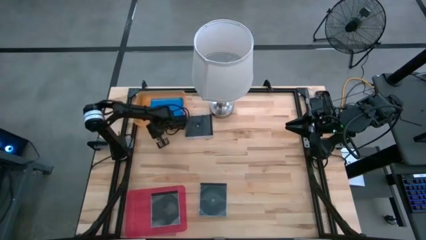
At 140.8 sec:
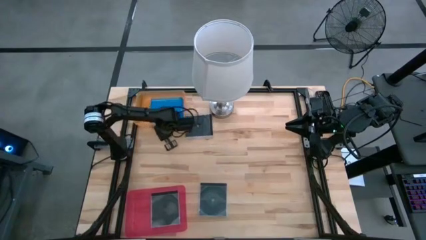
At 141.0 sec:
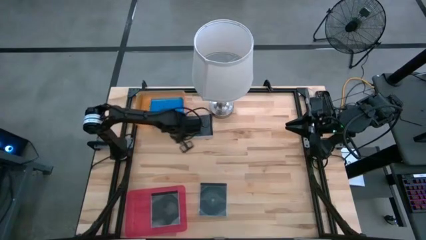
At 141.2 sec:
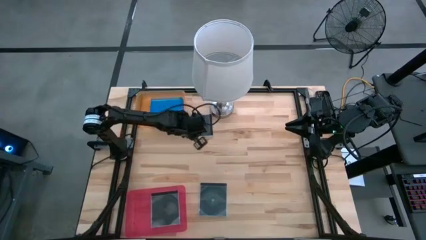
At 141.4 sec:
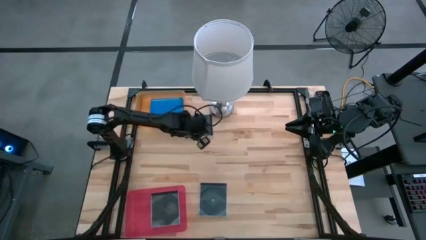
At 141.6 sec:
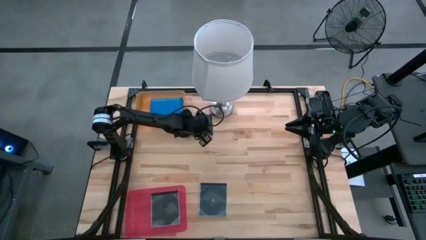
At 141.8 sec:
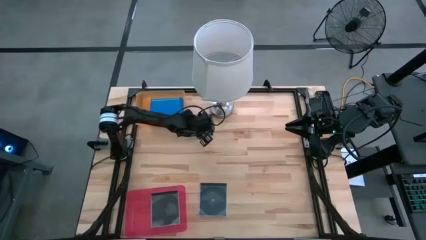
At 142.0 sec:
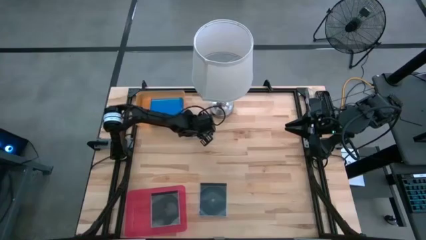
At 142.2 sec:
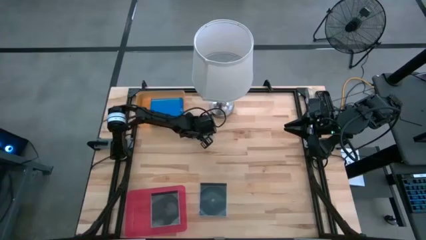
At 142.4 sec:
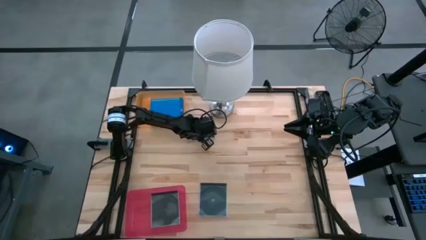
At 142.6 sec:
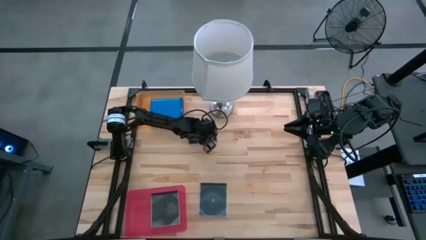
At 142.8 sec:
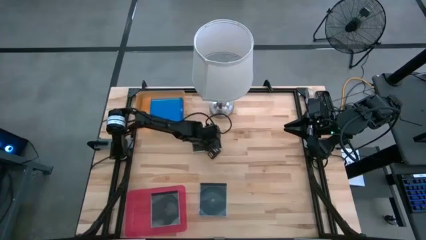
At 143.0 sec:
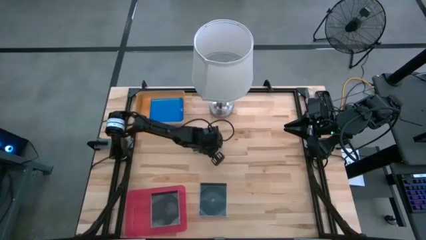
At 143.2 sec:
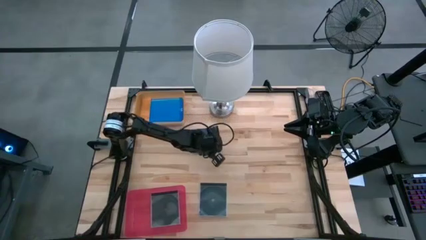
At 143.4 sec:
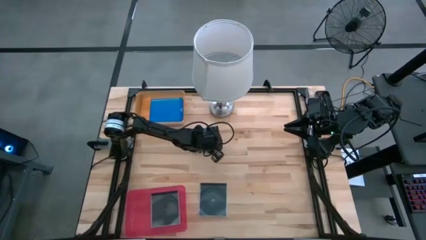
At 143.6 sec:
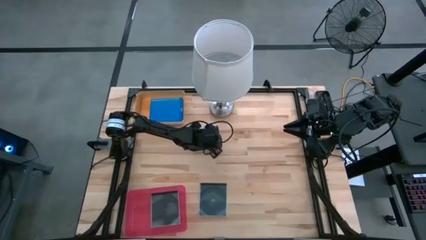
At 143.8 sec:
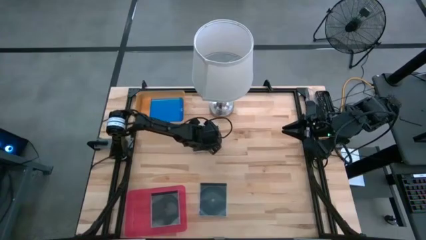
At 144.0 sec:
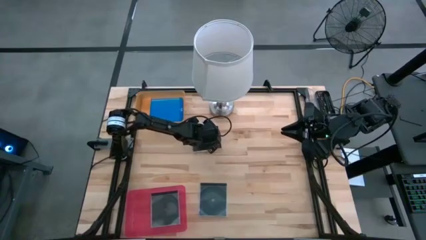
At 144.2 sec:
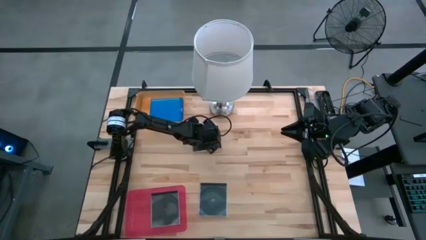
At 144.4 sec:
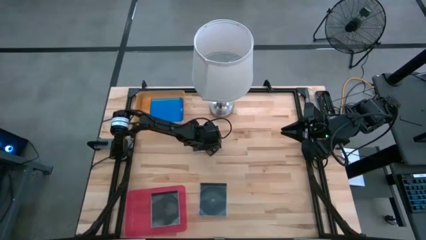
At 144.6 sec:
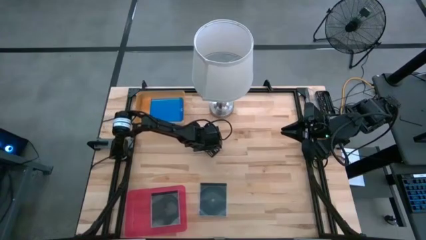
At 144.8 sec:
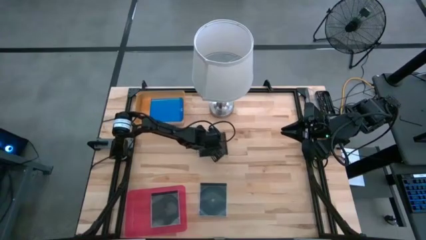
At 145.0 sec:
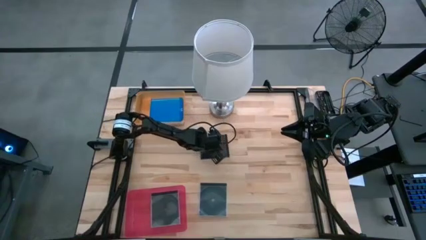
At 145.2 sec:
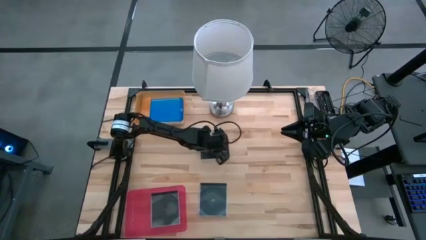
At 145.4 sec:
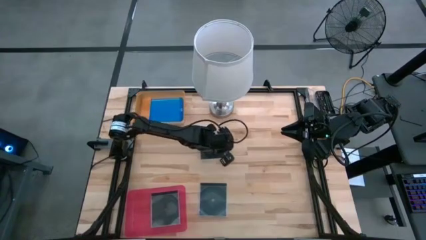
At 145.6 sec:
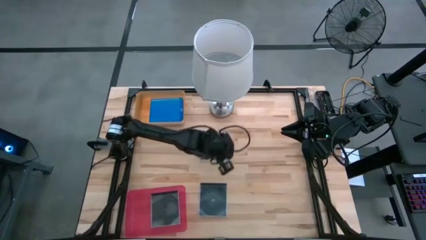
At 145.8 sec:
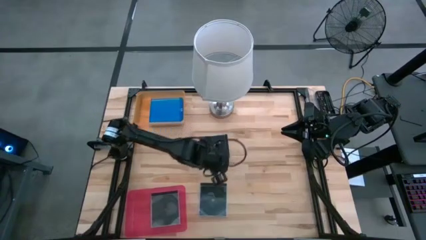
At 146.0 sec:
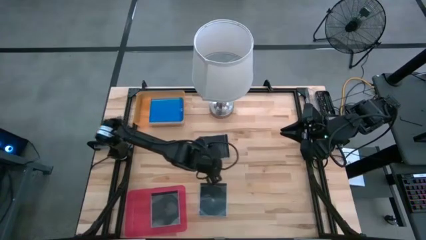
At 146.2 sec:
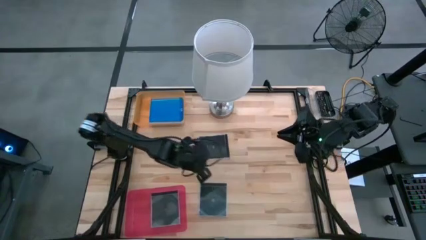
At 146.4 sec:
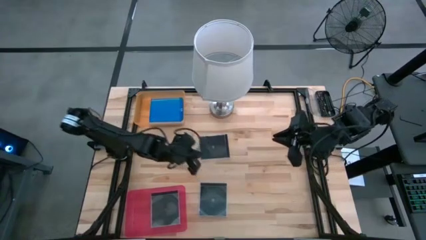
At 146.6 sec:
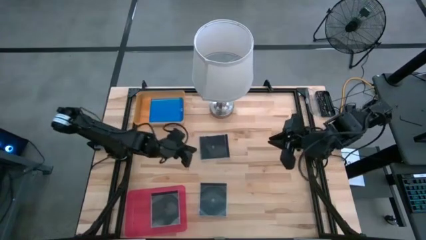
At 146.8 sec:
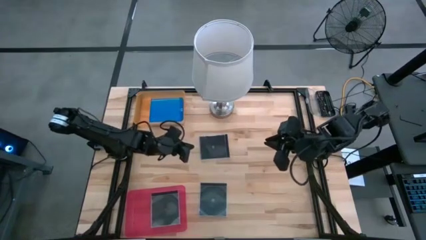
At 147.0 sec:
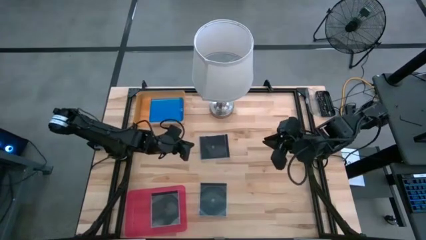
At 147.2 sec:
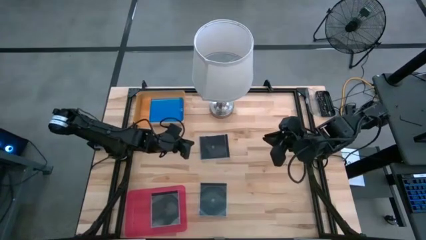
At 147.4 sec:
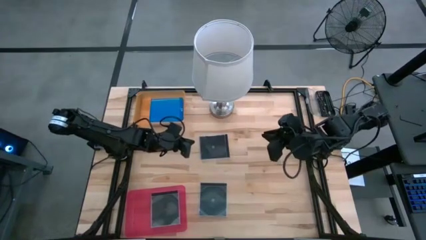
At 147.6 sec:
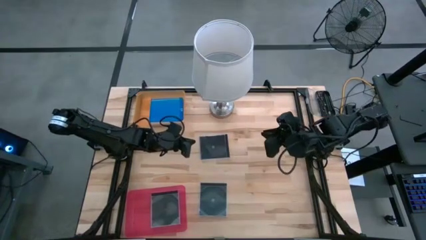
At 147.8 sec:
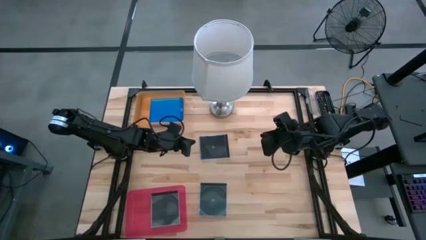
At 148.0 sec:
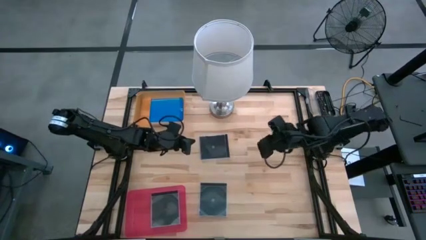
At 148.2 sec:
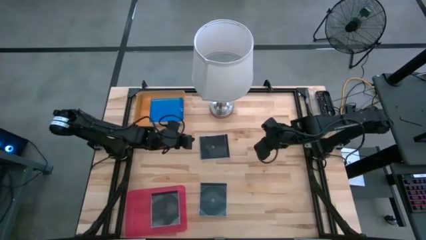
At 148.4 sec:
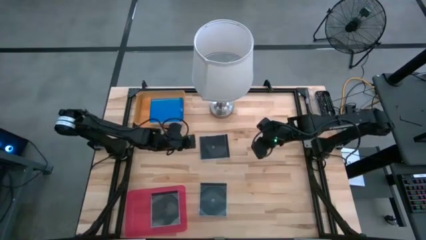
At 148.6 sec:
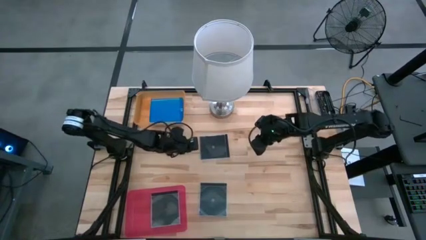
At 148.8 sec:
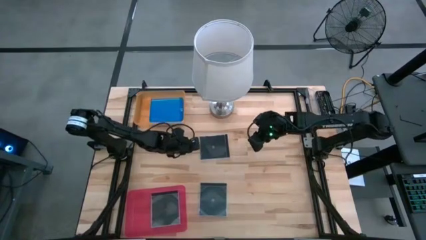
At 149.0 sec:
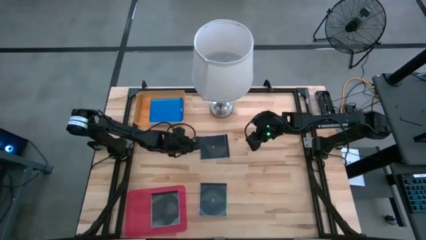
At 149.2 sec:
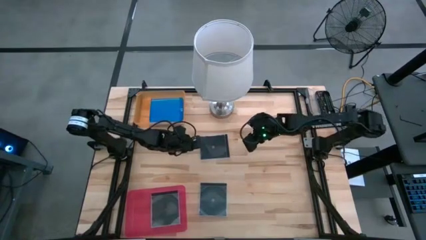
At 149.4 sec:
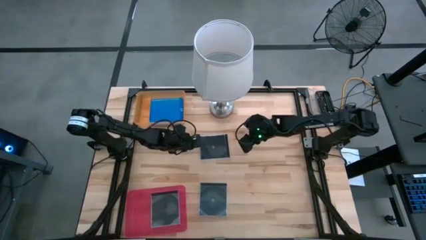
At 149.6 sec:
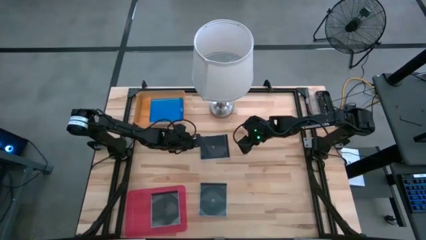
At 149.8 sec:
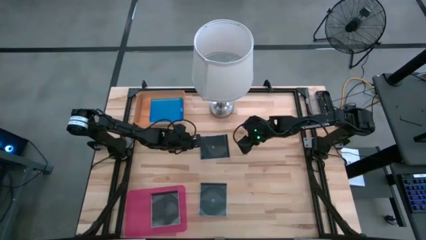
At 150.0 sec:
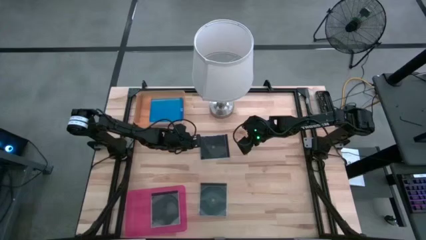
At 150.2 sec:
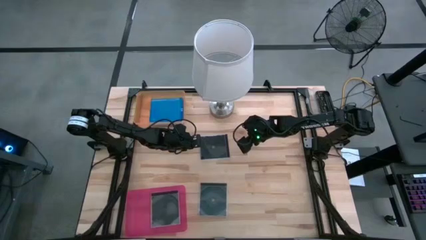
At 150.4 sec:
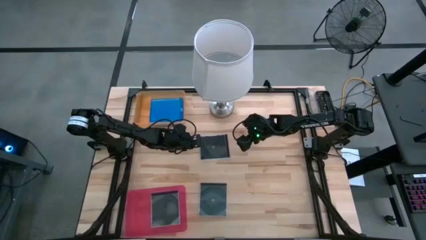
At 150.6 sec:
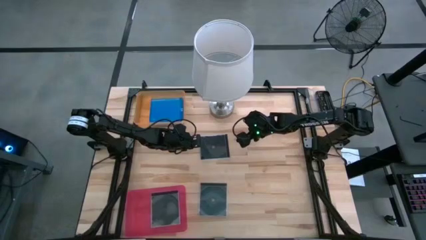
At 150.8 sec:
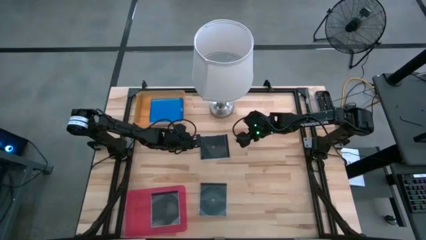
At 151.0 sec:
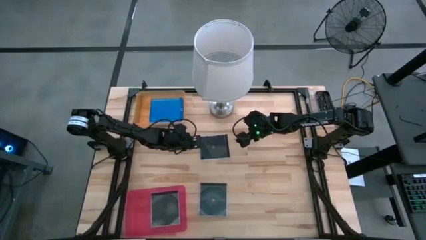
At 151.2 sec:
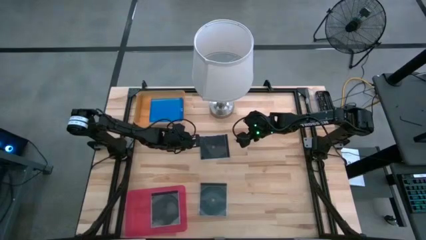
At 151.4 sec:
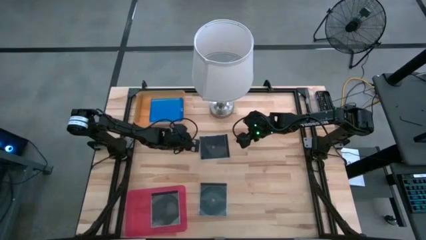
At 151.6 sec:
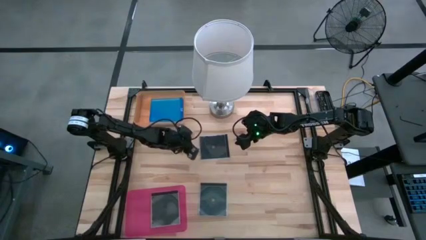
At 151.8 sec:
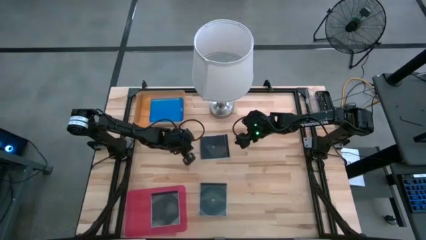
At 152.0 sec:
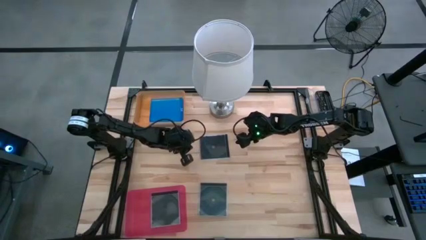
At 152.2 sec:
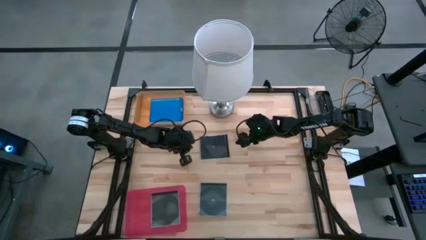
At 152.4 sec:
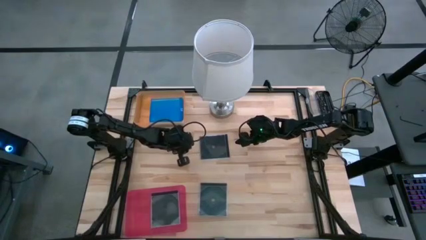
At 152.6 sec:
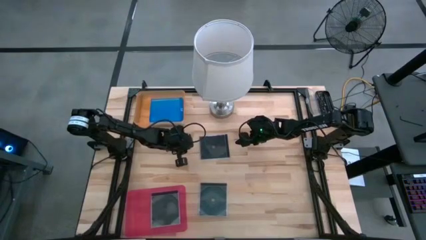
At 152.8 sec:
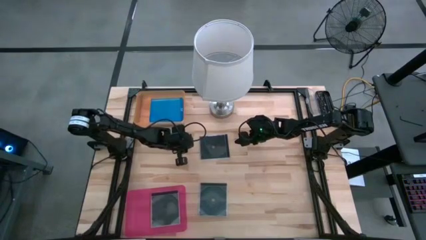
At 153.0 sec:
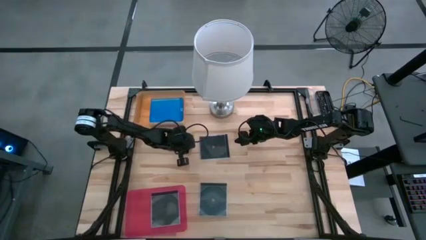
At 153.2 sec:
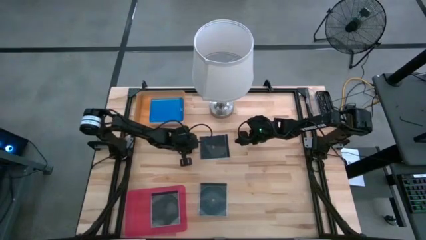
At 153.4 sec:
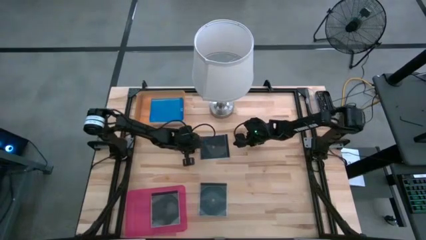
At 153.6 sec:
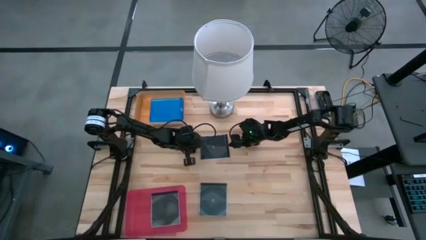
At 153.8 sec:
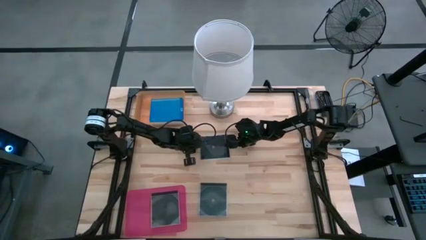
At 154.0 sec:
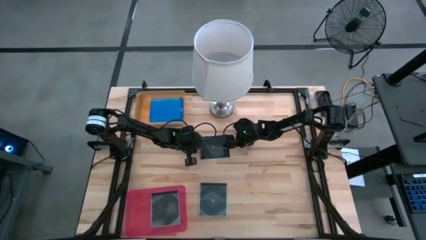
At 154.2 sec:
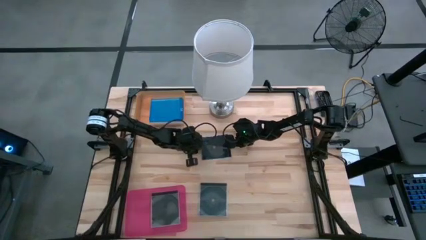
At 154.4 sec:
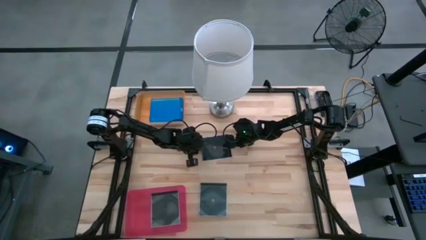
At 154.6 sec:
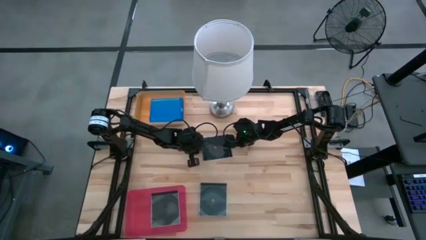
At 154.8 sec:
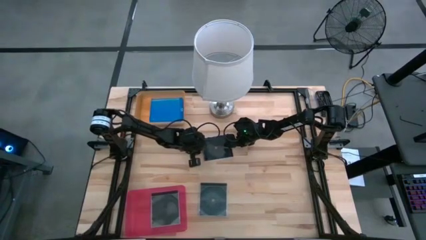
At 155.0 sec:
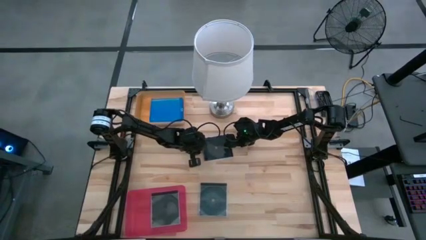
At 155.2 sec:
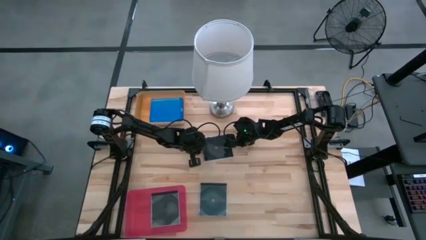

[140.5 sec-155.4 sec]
Task: Pick & place jewel cases by type
Put the top black cd case into the pink bin

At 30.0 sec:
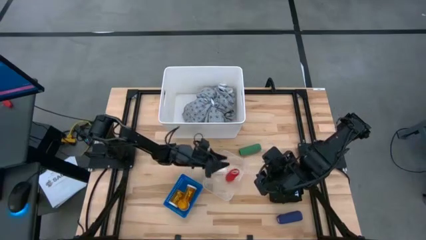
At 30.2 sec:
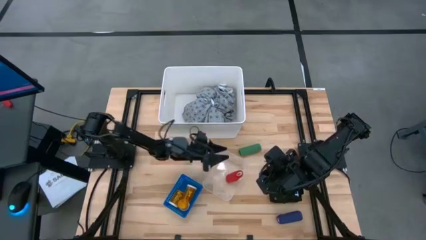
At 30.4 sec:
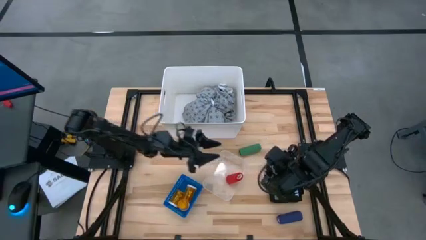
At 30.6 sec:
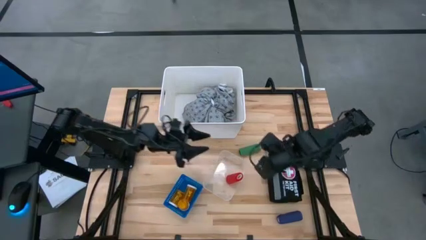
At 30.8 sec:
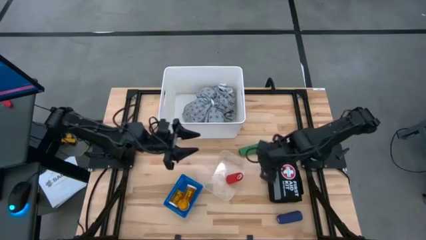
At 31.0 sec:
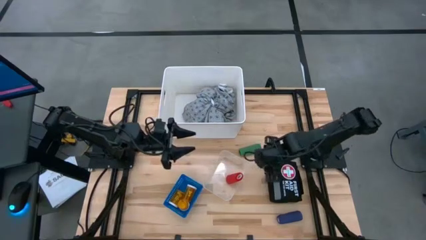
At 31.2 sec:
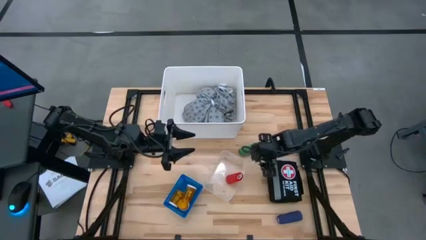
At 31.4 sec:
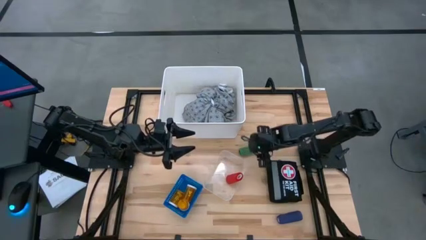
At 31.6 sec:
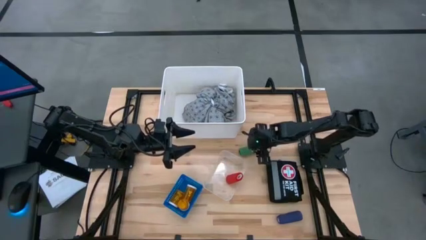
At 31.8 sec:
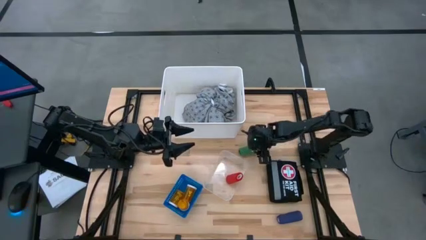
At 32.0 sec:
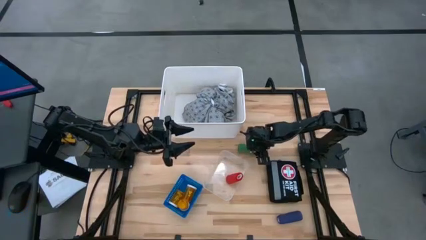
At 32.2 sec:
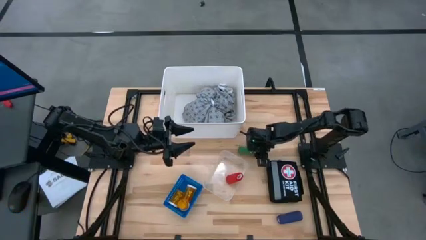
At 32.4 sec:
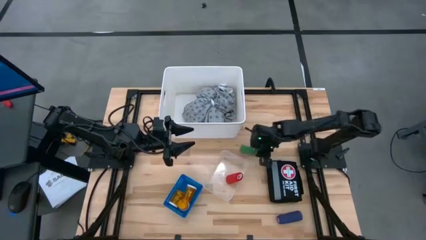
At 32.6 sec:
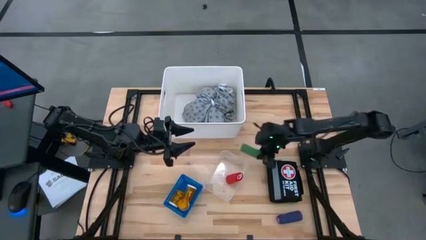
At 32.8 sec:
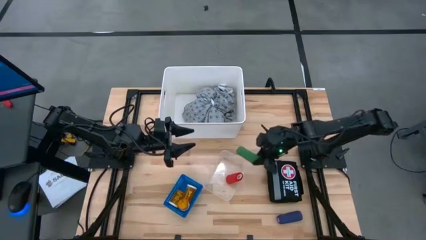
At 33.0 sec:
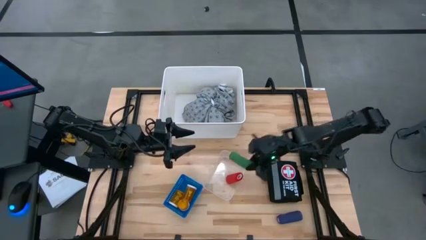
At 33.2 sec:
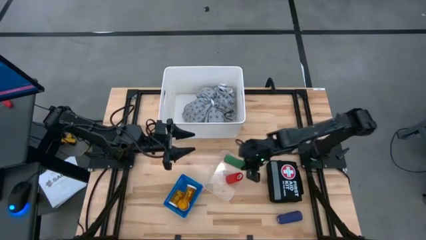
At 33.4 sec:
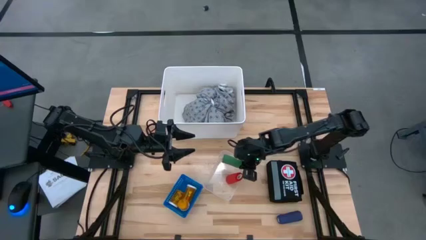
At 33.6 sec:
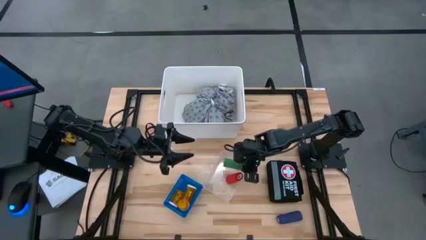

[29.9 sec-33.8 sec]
Task: Pick & Place Medicine items
Put the green bandage into the transparent bin
